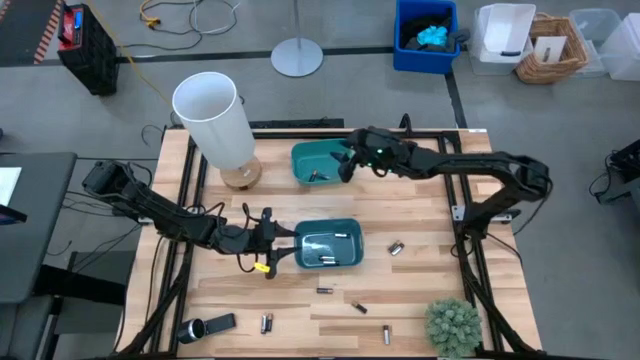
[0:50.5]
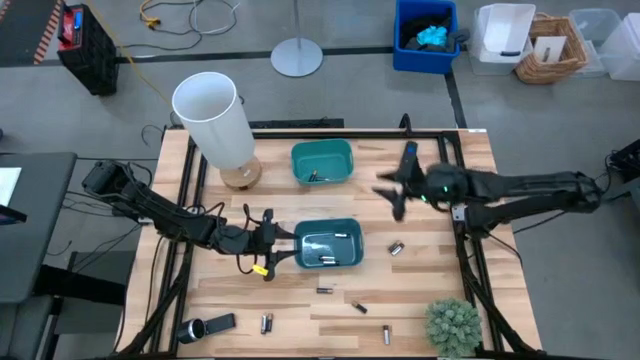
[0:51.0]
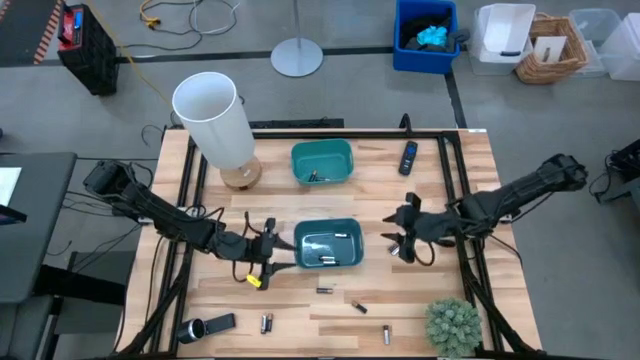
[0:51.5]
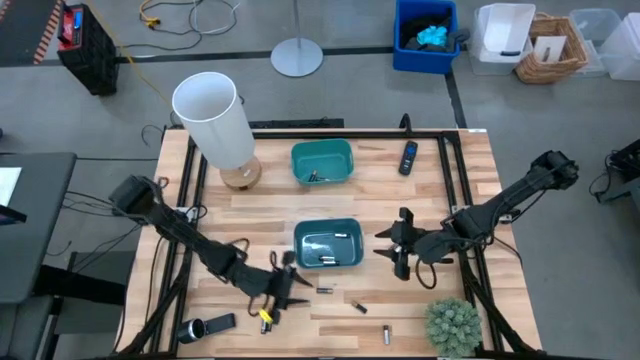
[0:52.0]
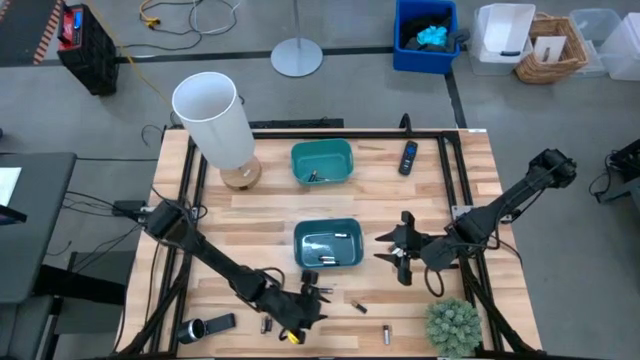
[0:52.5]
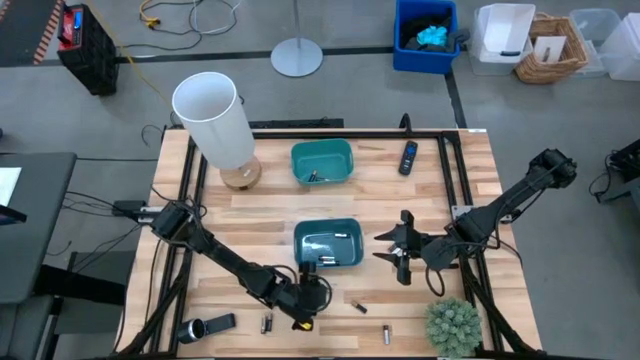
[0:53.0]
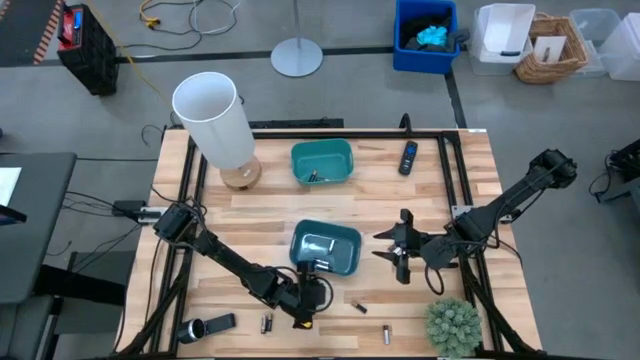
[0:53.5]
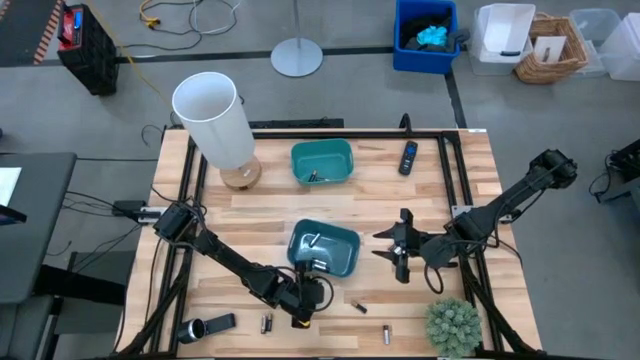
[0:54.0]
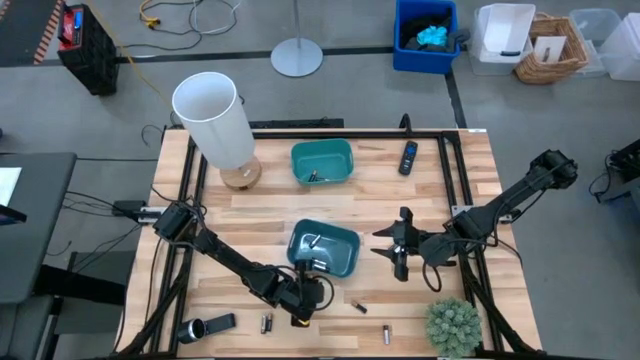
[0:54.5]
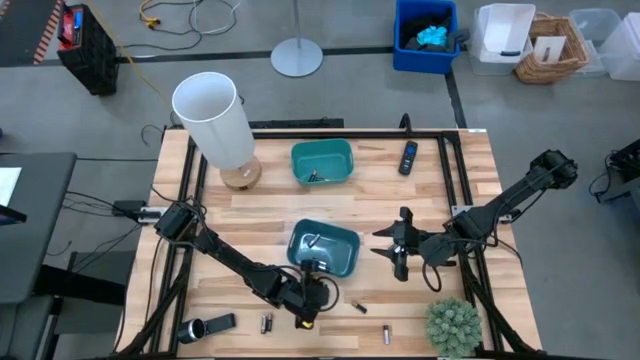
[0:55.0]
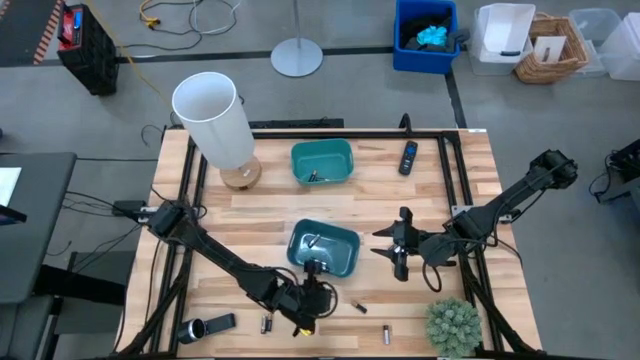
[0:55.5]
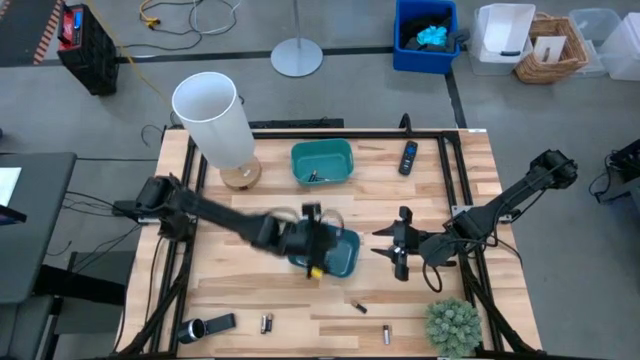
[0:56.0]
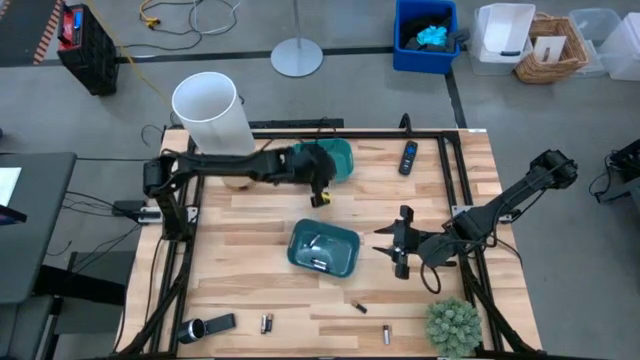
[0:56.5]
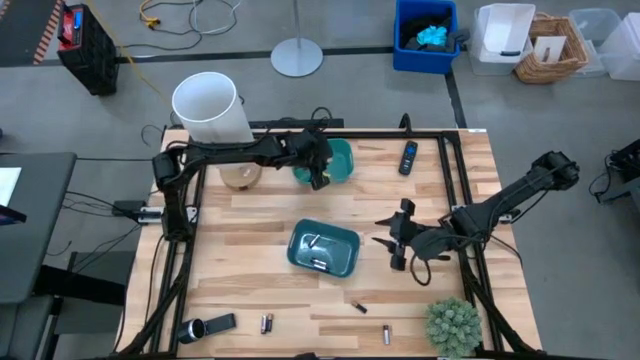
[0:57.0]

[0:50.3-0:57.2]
Task: Sort batteries
Put the black battery into the green bin

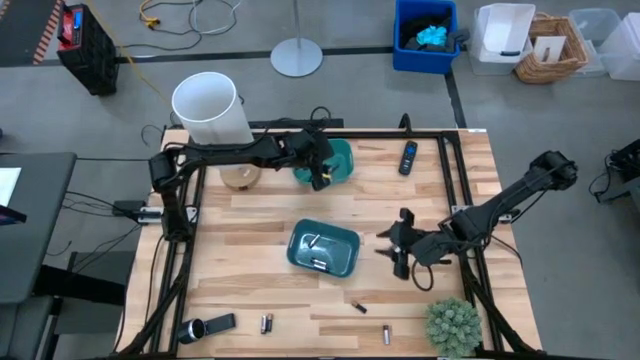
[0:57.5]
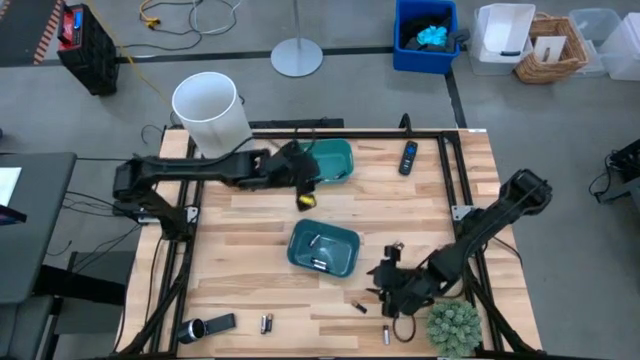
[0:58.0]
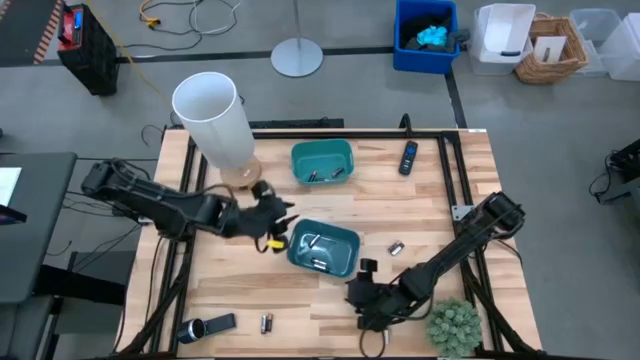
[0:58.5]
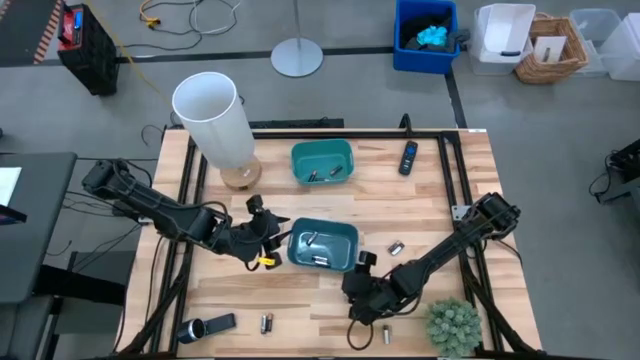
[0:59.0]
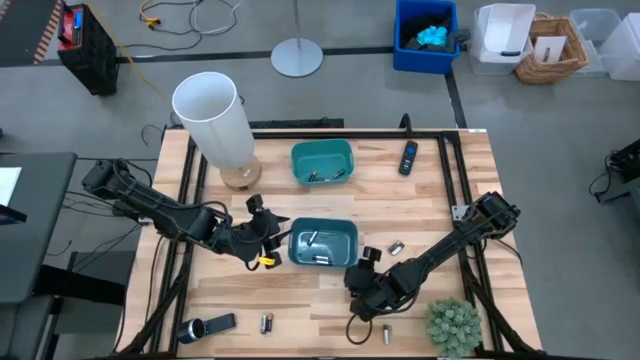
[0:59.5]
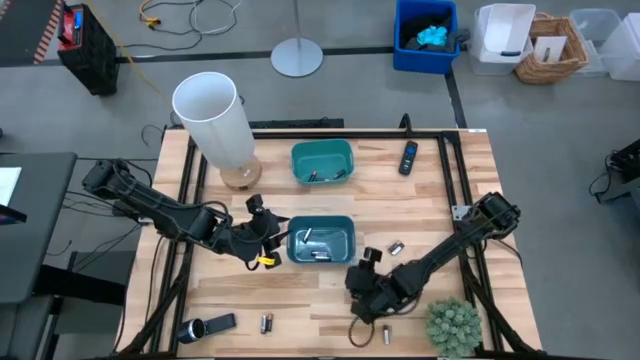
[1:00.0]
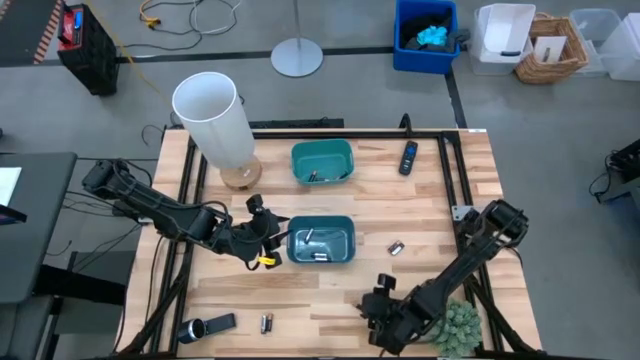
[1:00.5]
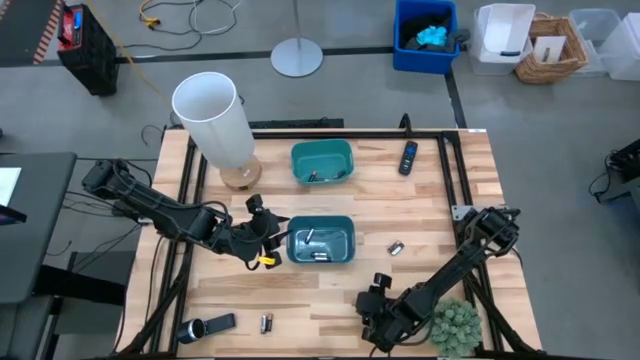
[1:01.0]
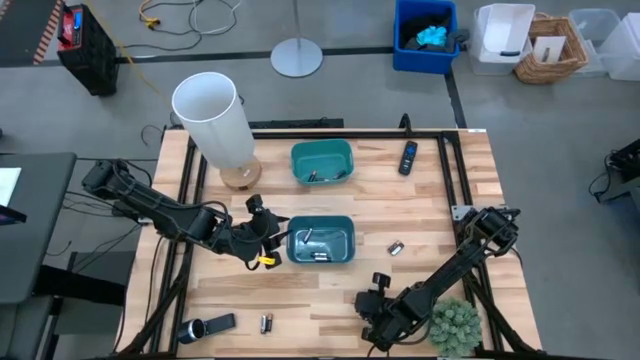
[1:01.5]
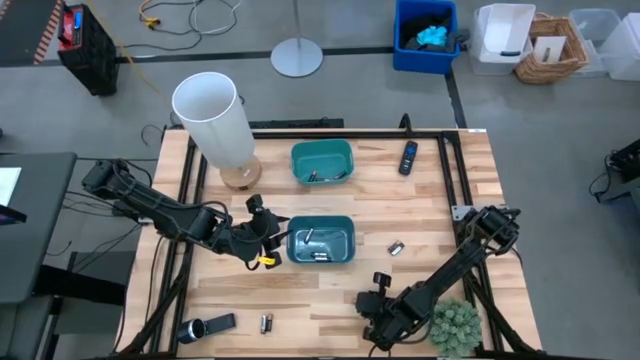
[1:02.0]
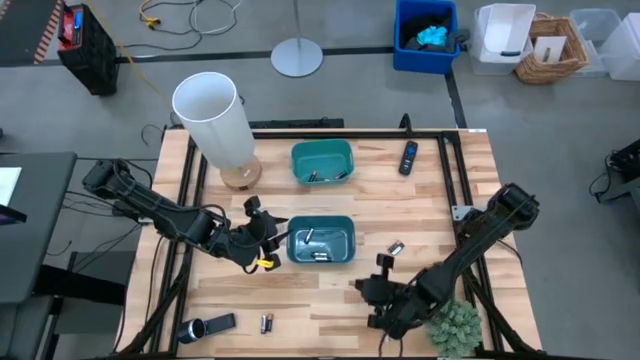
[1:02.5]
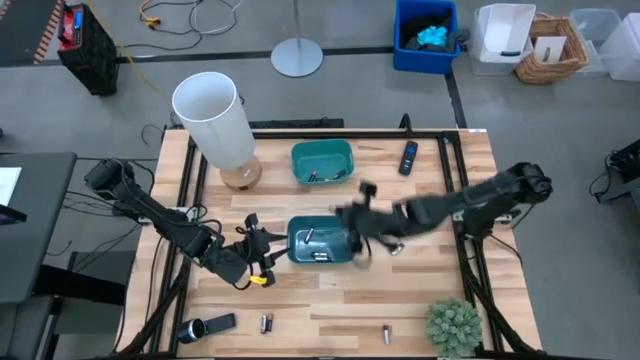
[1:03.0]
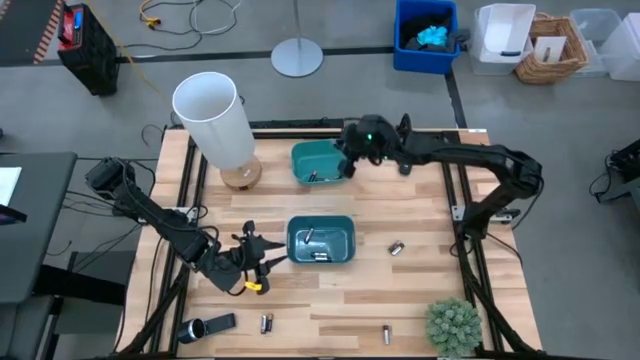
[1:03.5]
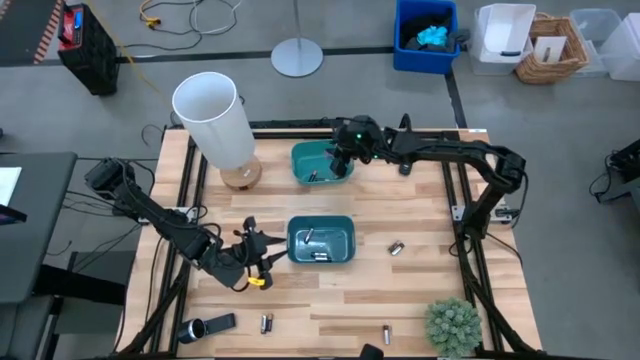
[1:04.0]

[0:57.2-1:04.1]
Put the black battery into the green bin

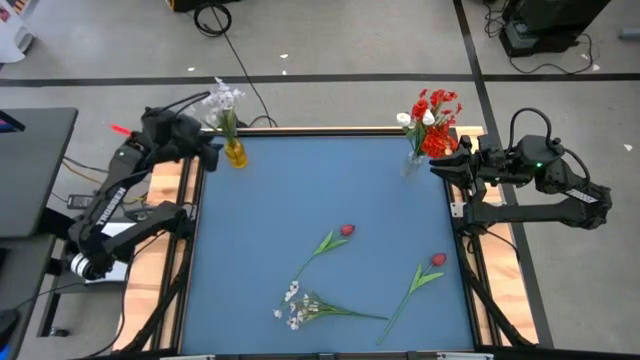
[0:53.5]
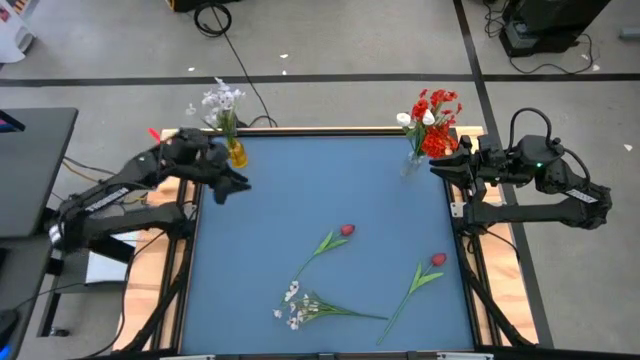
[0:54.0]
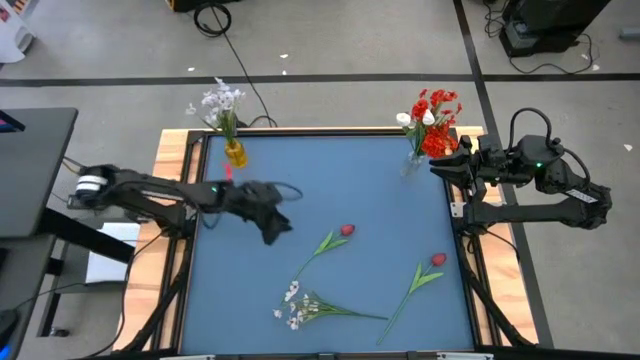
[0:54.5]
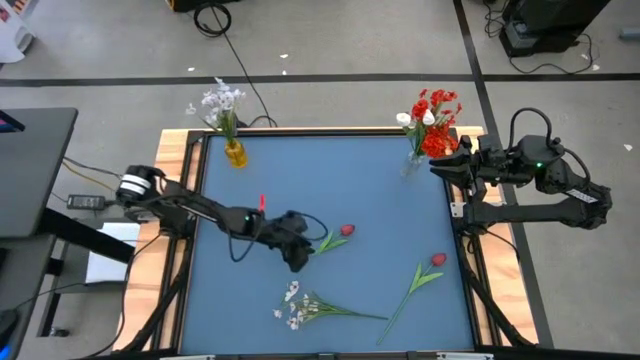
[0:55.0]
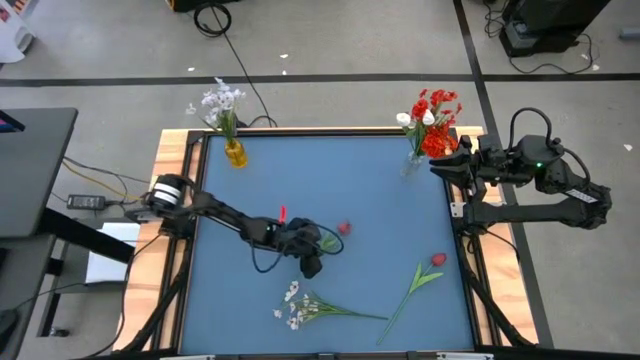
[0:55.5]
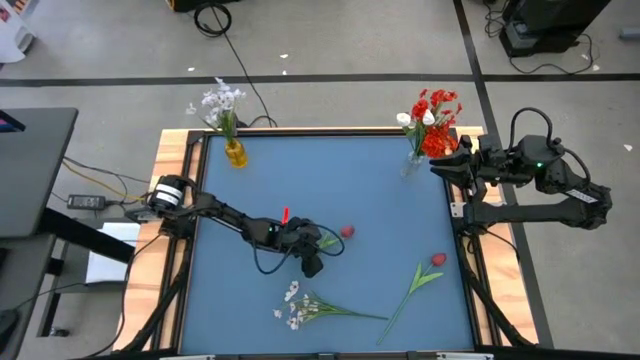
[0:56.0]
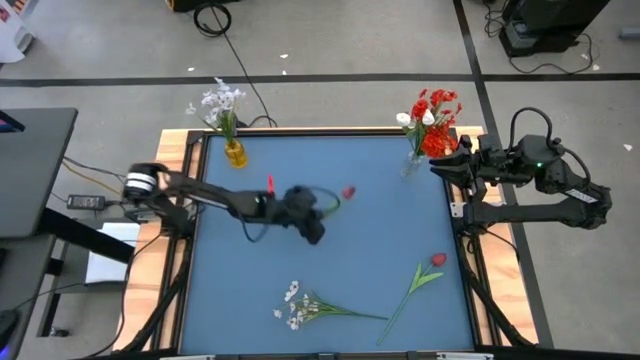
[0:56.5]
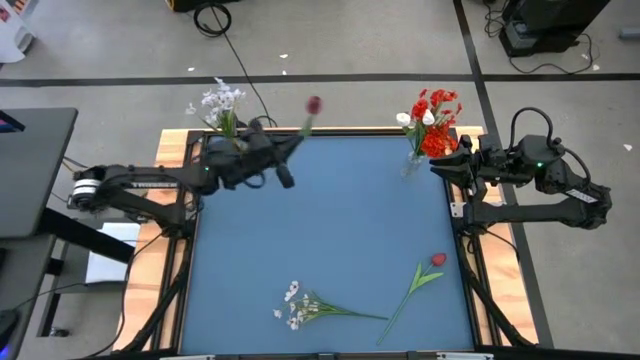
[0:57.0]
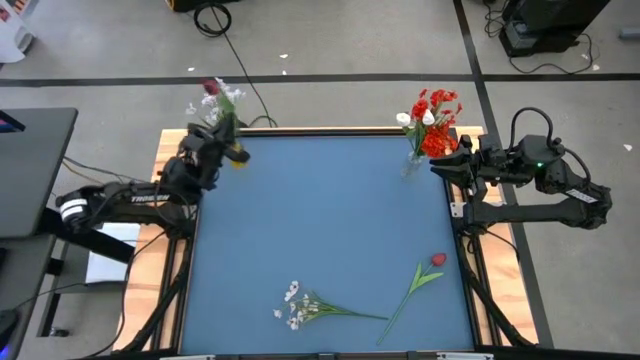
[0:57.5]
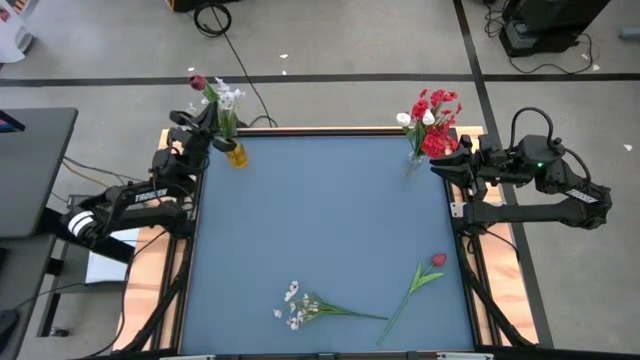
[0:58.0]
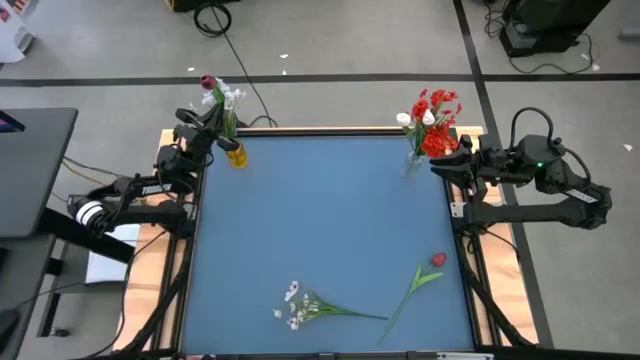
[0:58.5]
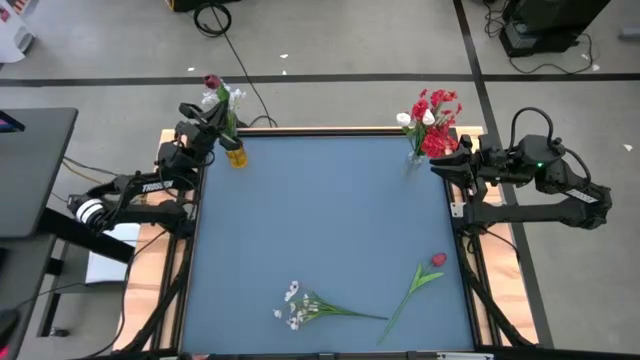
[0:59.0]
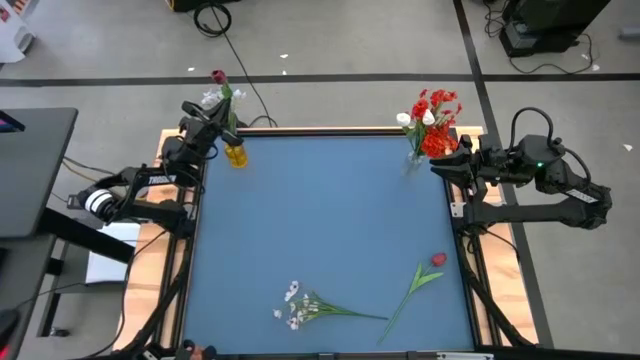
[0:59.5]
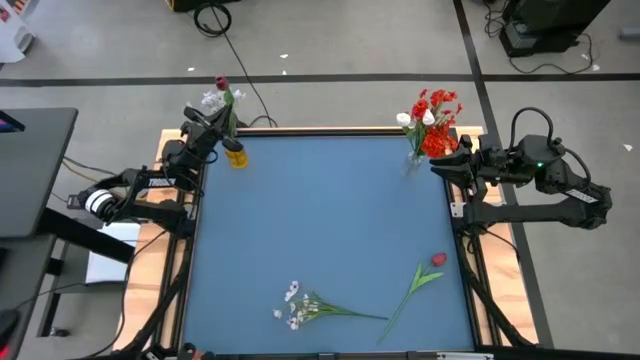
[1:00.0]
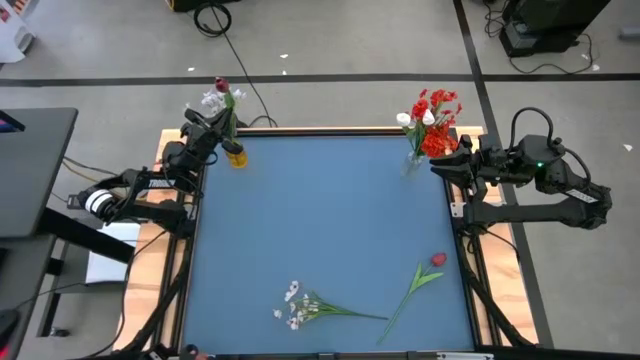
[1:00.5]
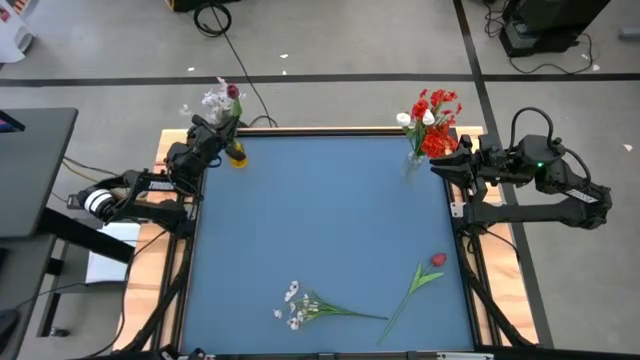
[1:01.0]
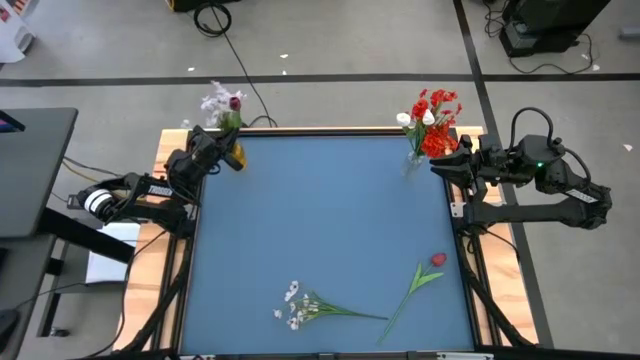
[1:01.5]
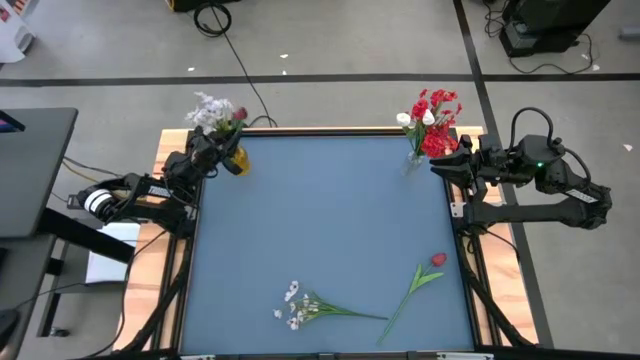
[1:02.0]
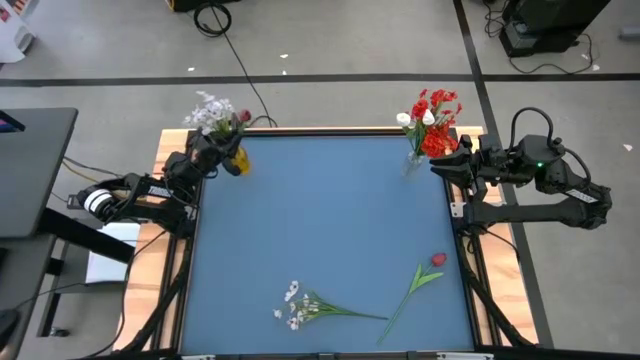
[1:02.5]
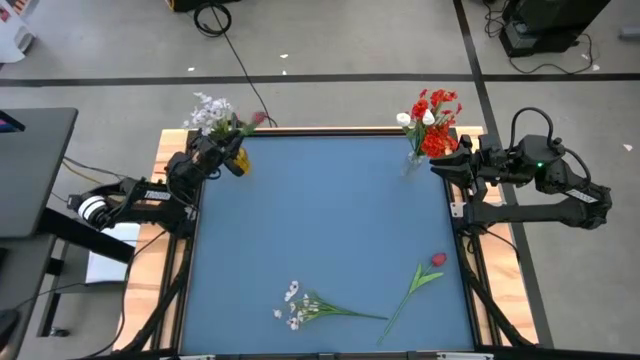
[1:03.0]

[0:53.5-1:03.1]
Task: Sort flowers into vase by color
Put the top red tulip into the yellow vase
